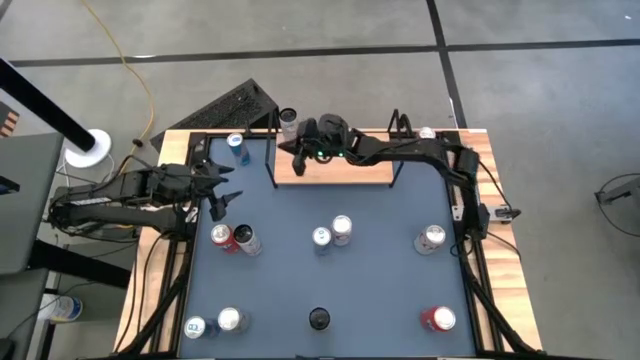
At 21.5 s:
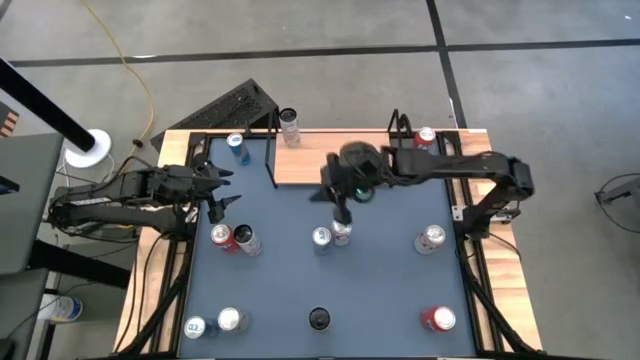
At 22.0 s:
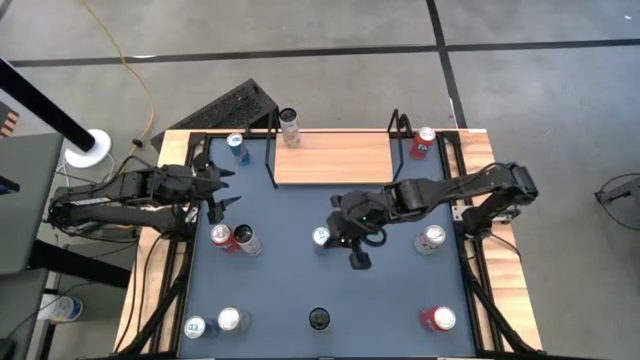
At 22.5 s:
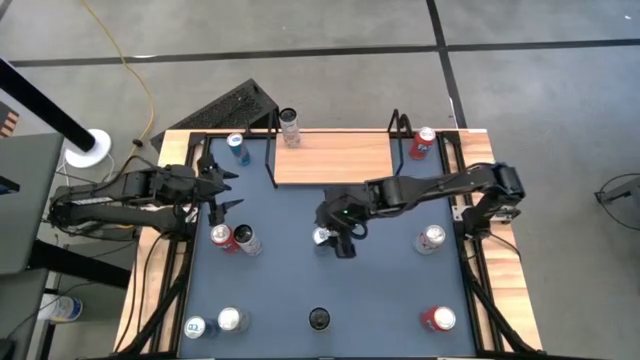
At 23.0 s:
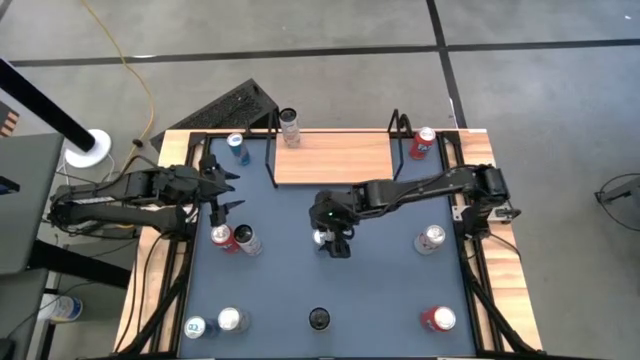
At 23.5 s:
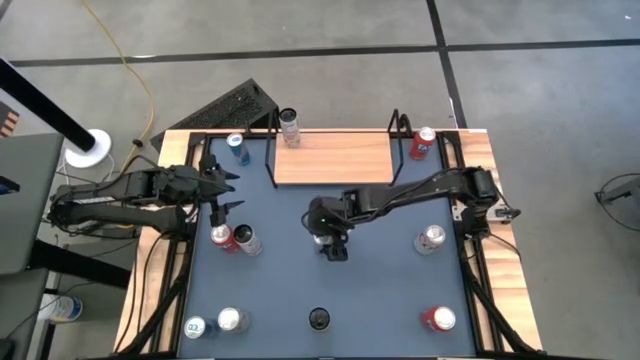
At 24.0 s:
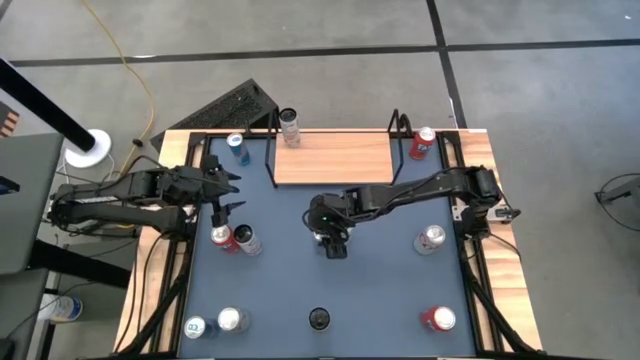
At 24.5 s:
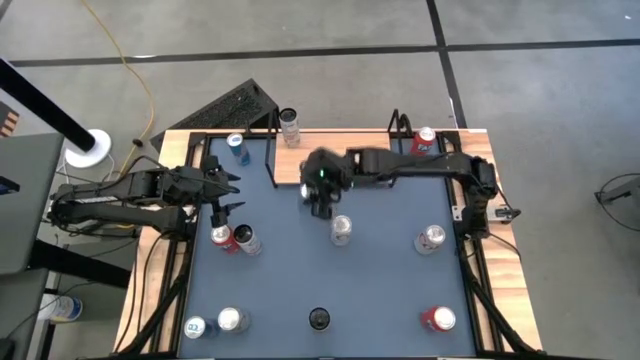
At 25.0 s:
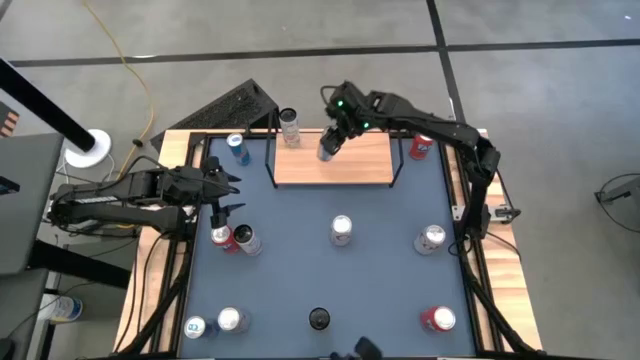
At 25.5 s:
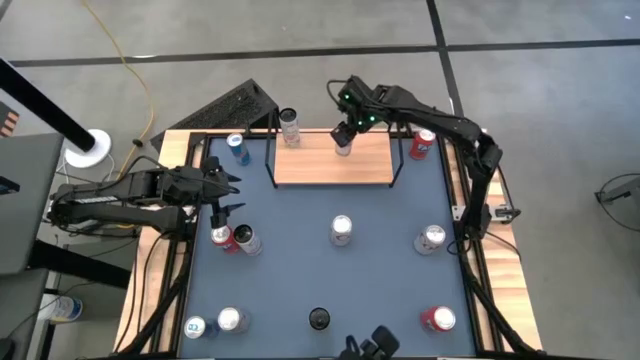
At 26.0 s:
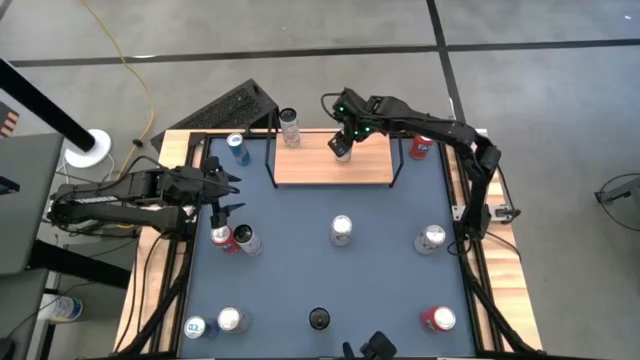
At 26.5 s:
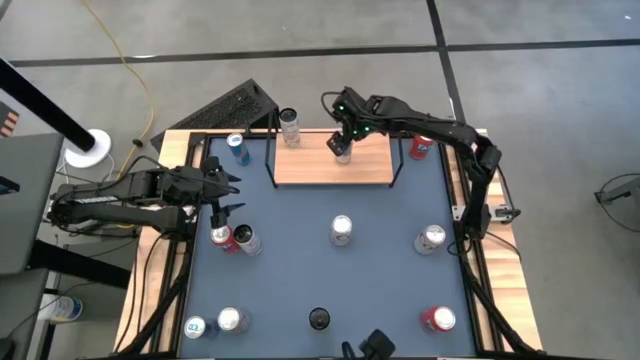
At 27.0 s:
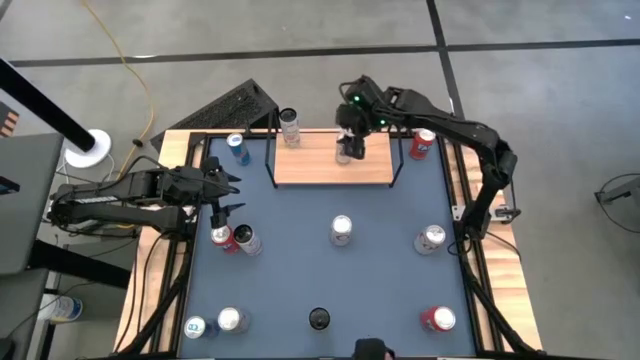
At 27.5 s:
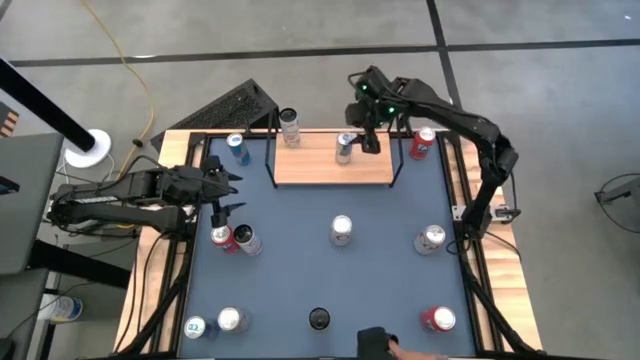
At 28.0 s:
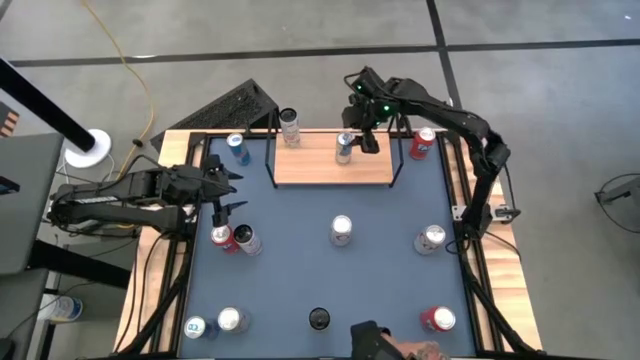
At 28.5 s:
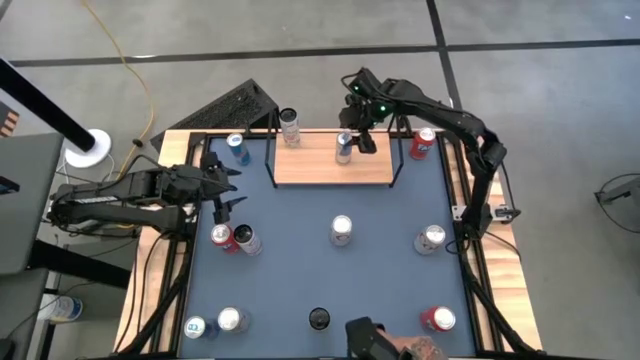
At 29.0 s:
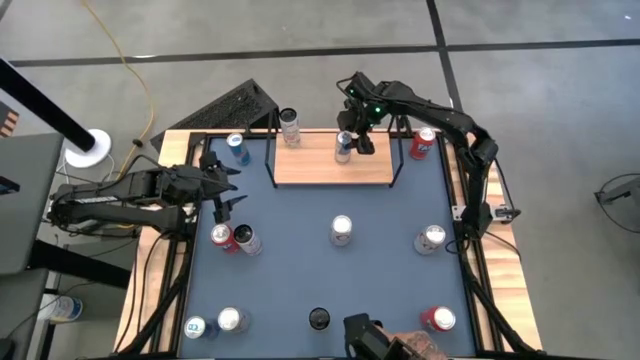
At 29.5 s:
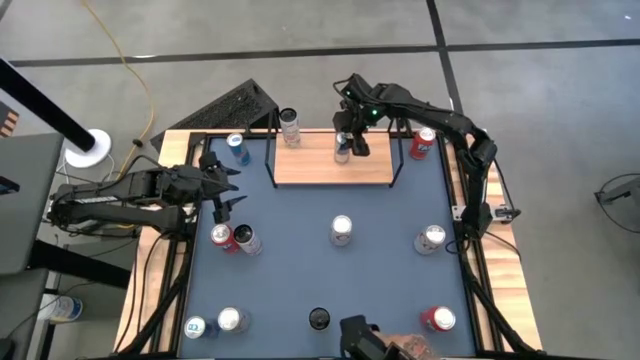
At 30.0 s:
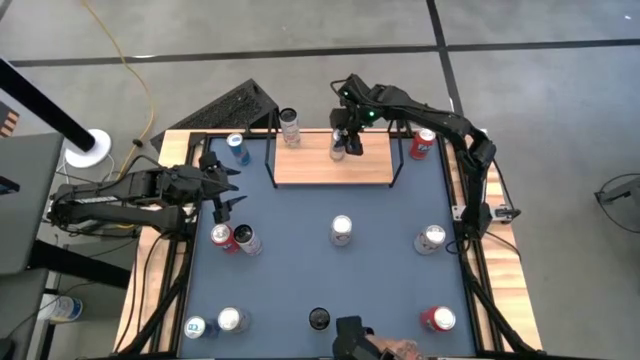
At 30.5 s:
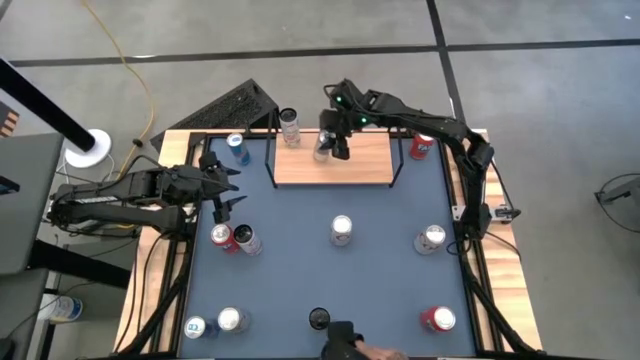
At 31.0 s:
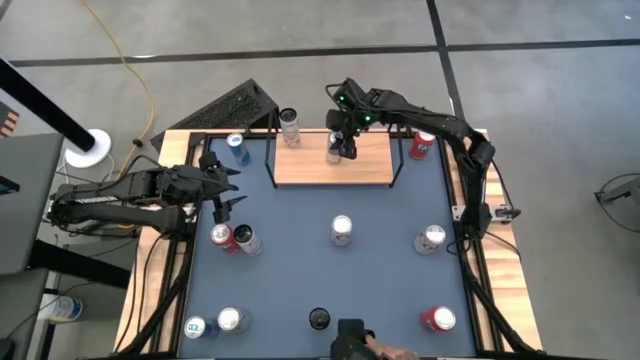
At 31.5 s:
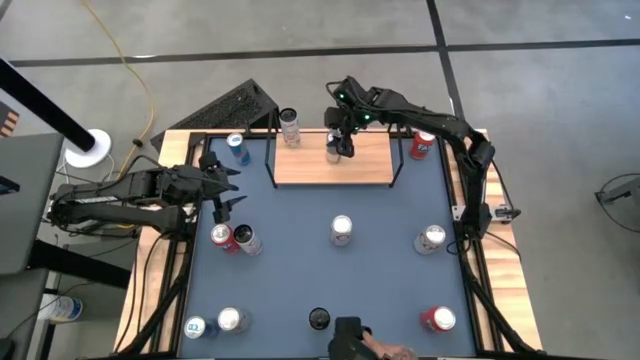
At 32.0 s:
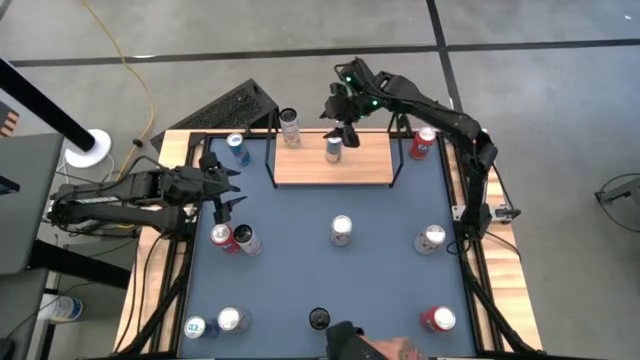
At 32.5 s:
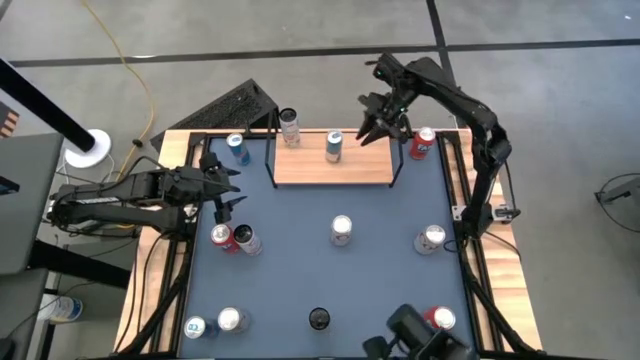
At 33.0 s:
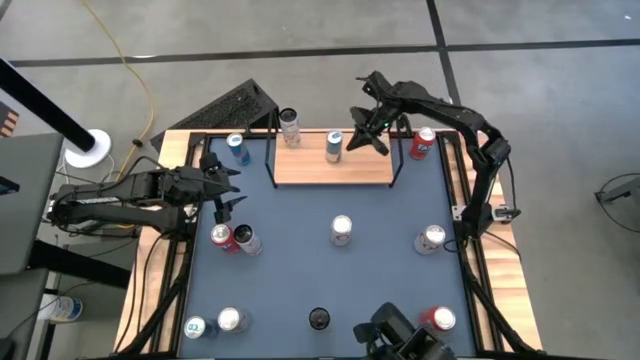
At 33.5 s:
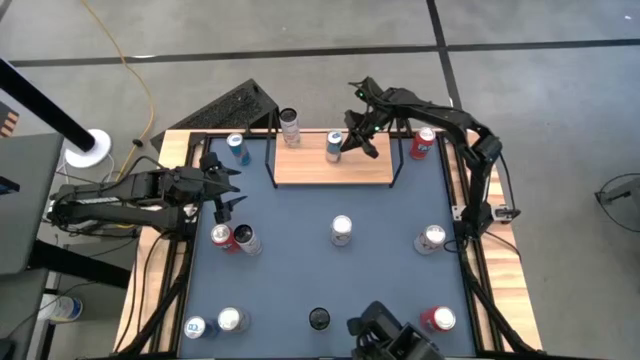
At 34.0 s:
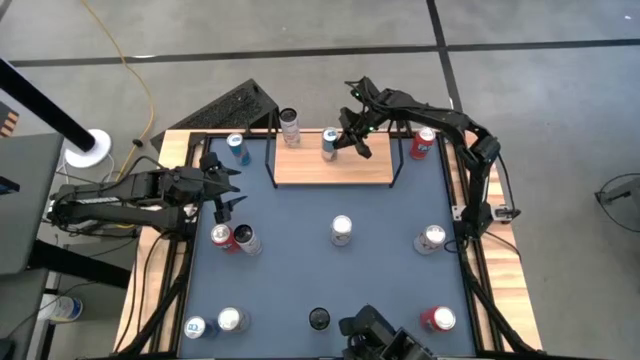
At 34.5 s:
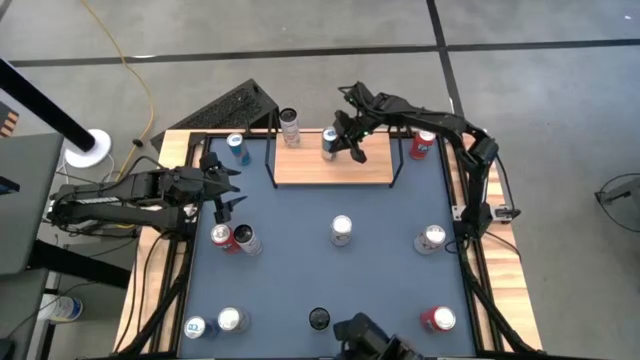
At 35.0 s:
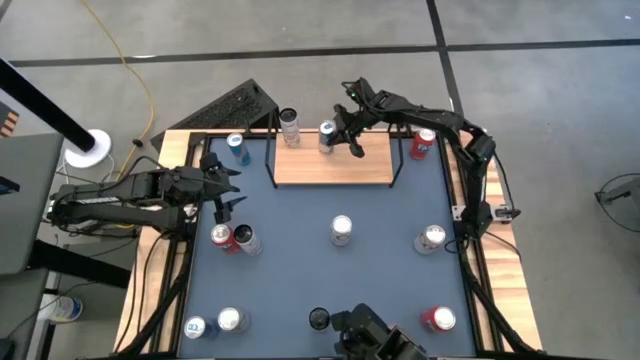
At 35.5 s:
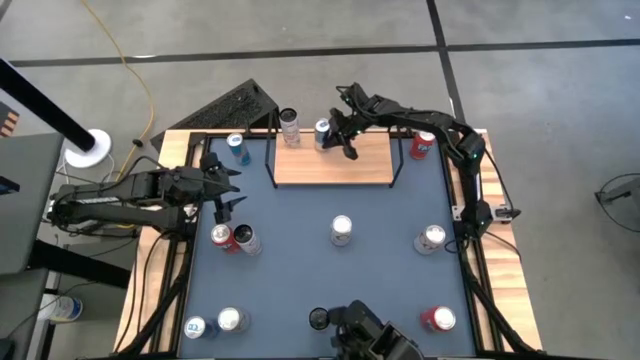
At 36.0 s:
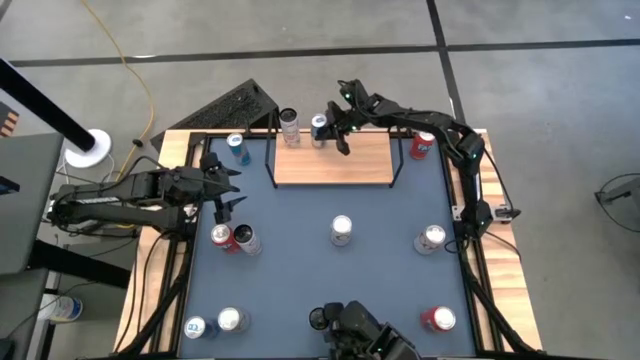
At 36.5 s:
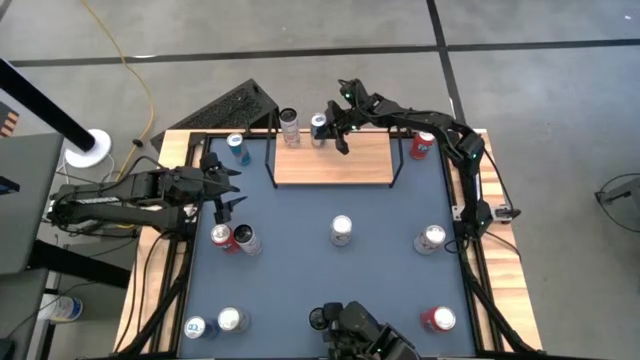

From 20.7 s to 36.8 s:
Task: Place canned beverage on shelf
Put the middle blue soda can on the shelf

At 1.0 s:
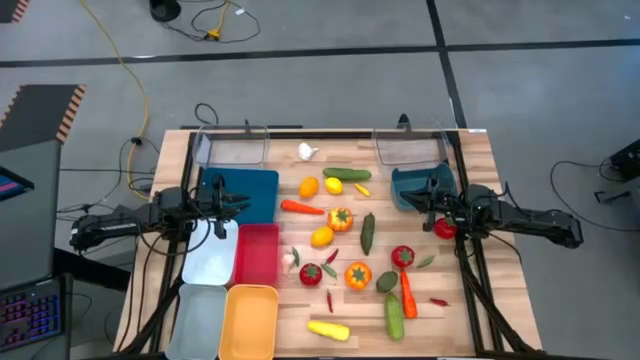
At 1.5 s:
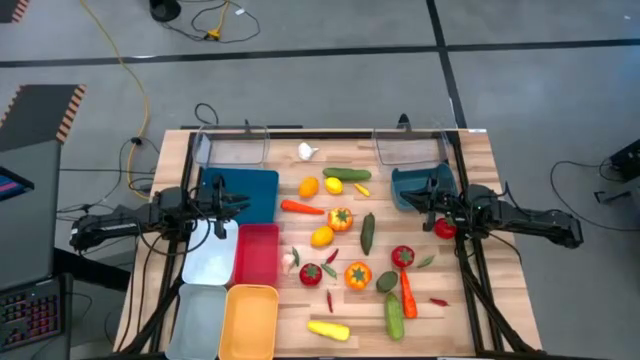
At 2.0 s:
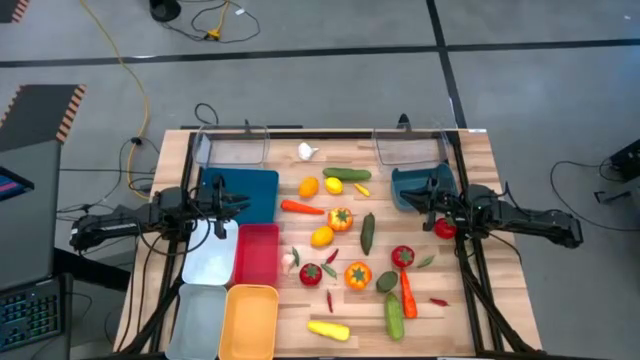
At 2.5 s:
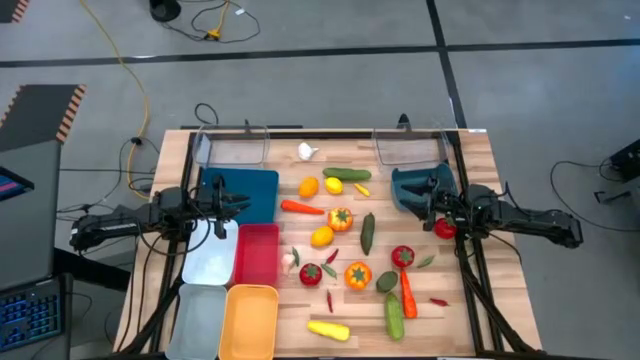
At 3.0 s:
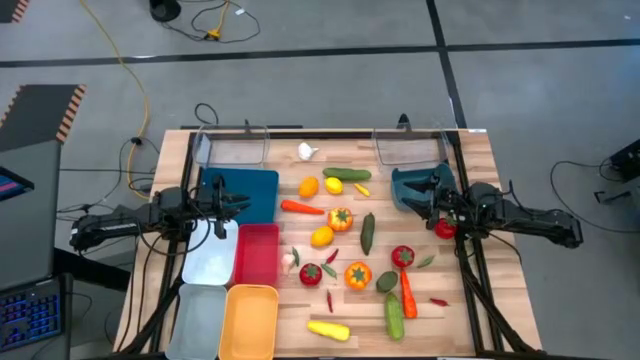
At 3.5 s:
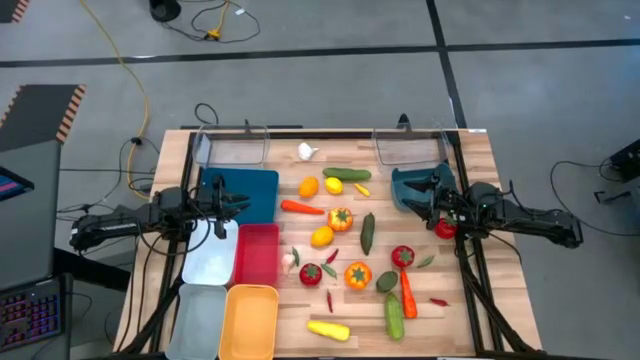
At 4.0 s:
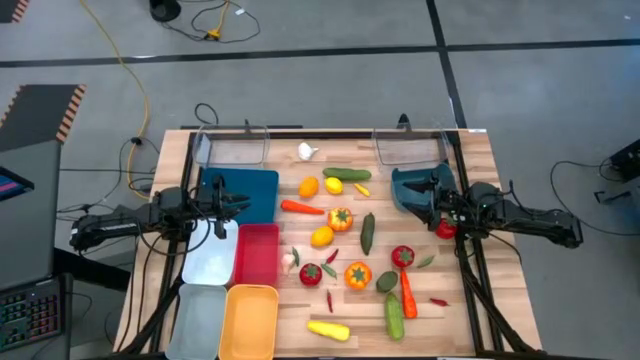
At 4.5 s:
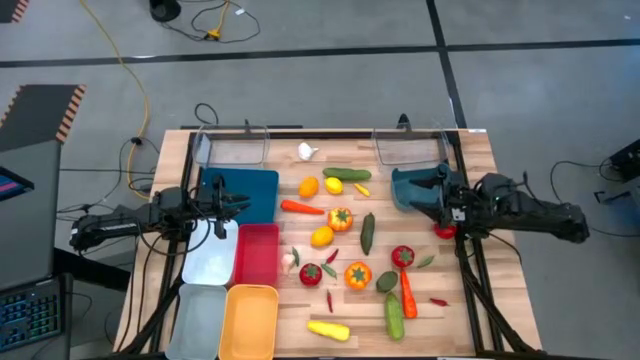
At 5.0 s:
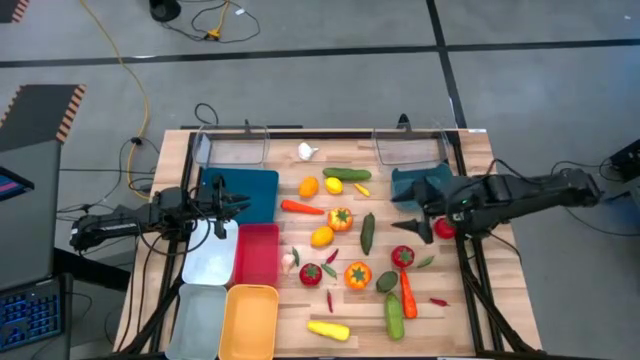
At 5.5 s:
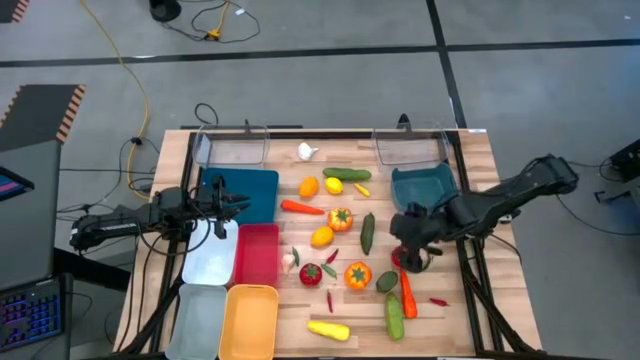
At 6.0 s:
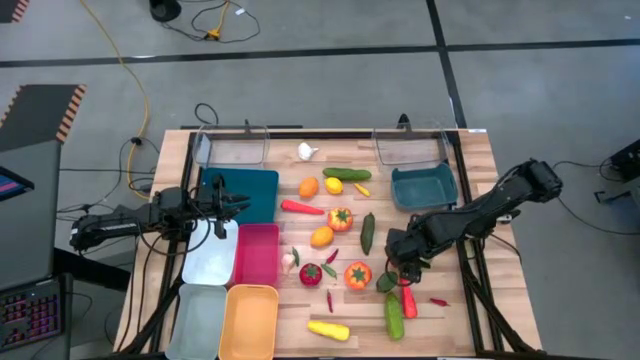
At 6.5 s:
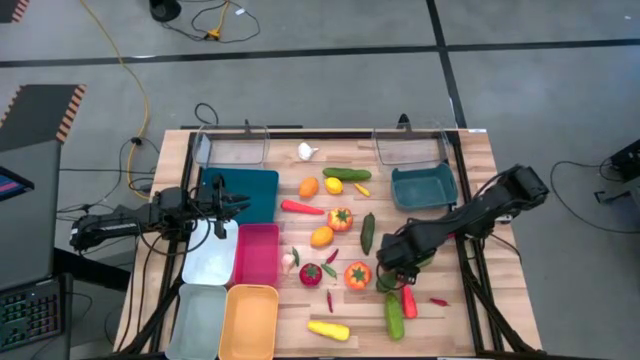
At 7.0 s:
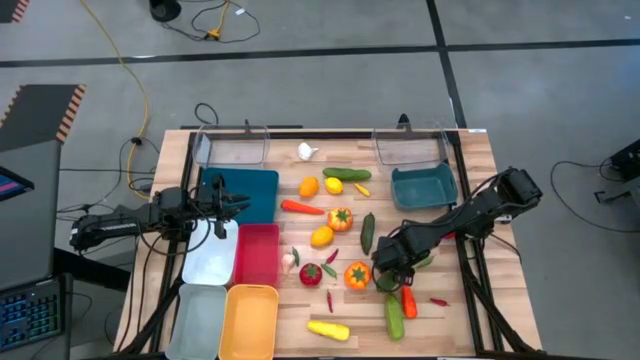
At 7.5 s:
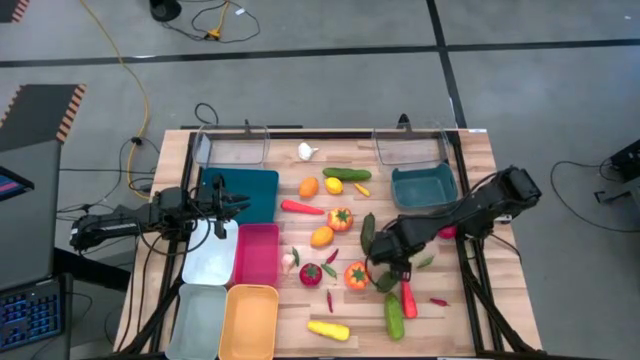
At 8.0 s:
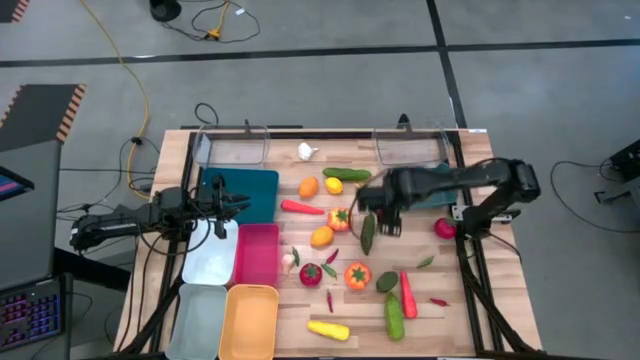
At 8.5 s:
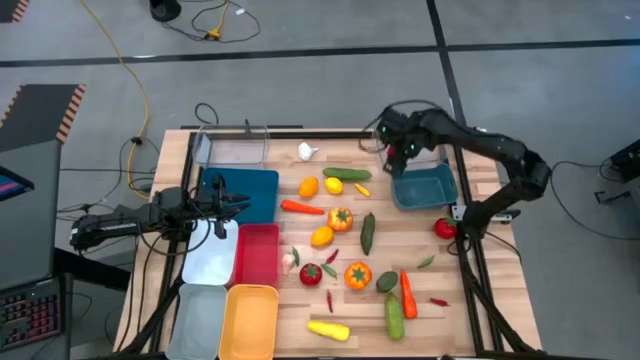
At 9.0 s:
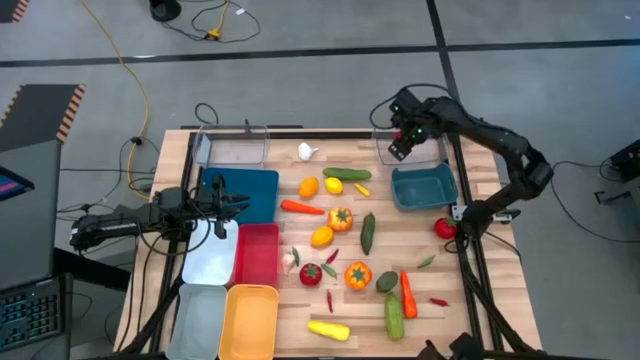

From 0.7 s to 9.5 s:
Task: Sort produce into baskets
Put the middle red tomato into the right transparent bin
